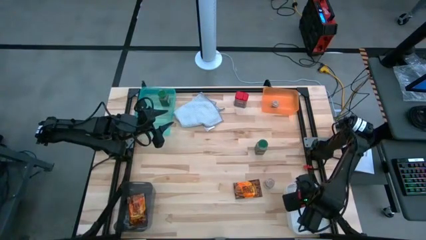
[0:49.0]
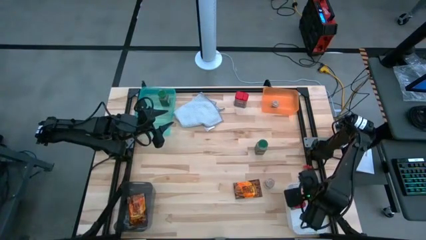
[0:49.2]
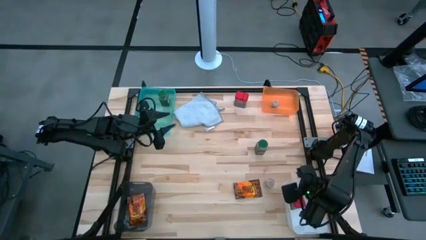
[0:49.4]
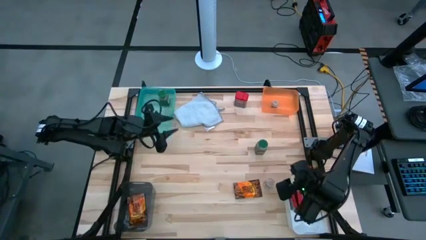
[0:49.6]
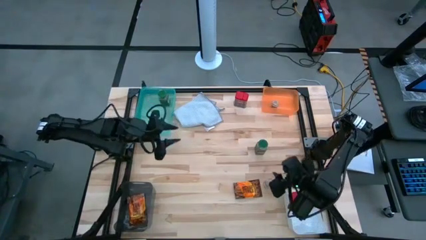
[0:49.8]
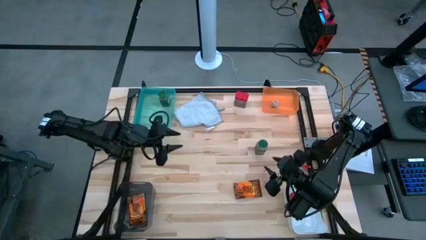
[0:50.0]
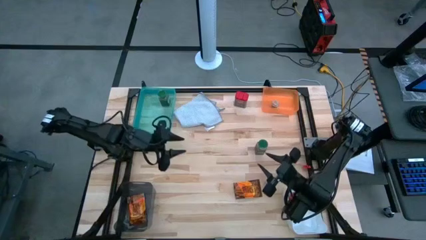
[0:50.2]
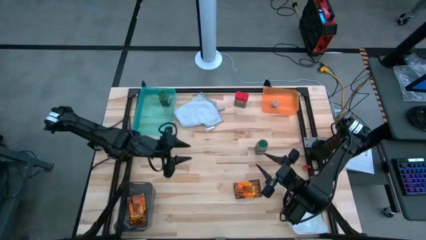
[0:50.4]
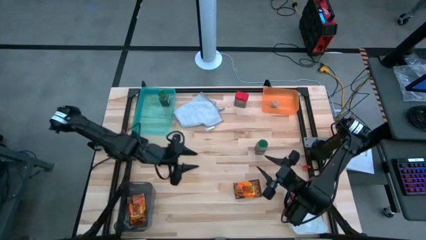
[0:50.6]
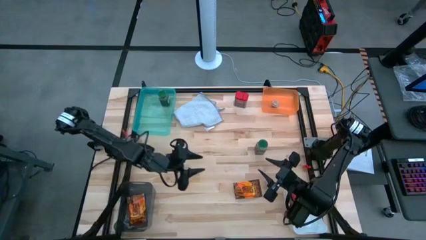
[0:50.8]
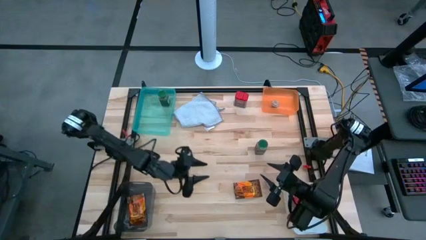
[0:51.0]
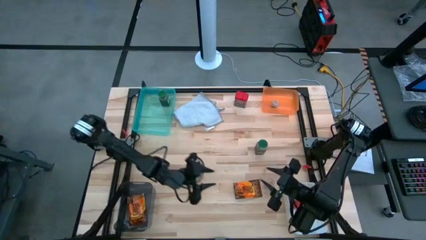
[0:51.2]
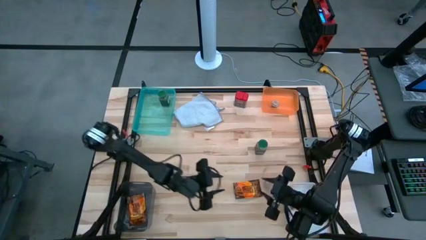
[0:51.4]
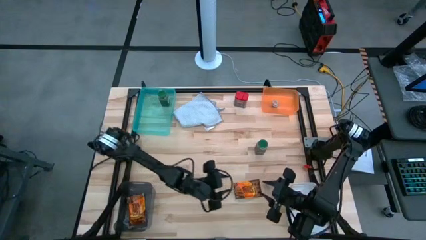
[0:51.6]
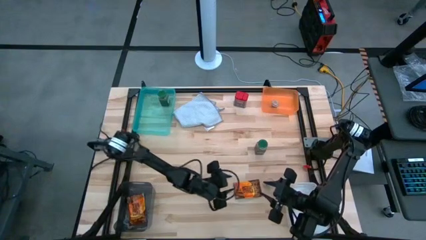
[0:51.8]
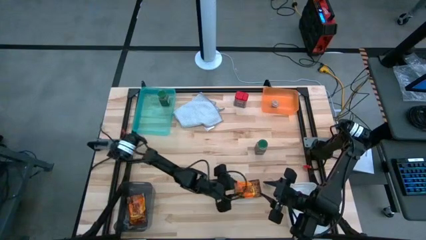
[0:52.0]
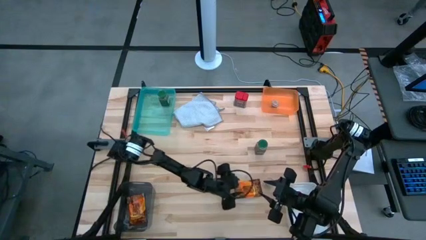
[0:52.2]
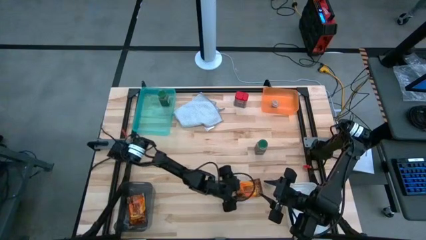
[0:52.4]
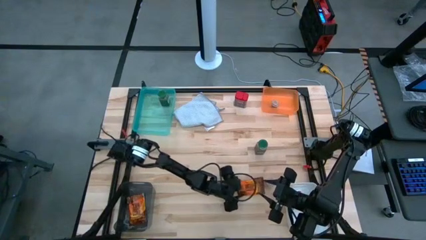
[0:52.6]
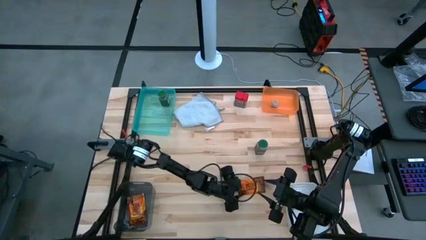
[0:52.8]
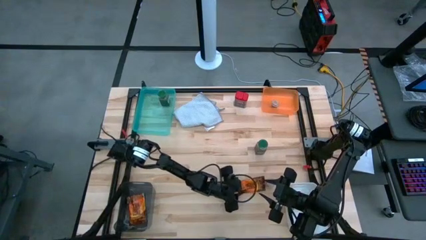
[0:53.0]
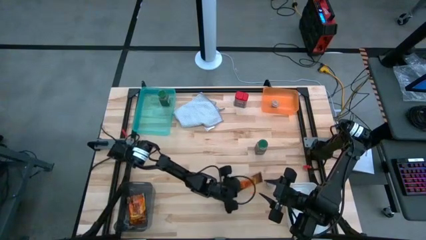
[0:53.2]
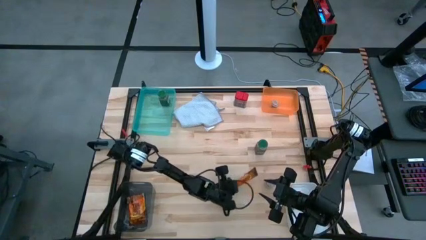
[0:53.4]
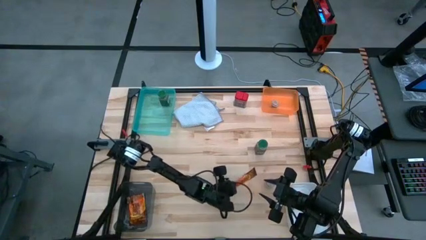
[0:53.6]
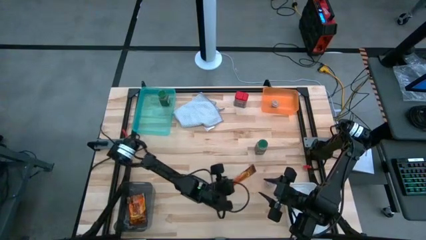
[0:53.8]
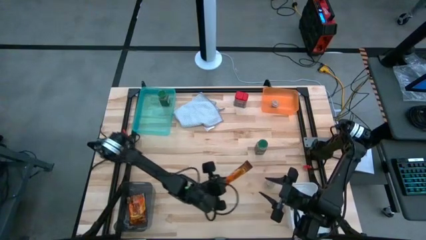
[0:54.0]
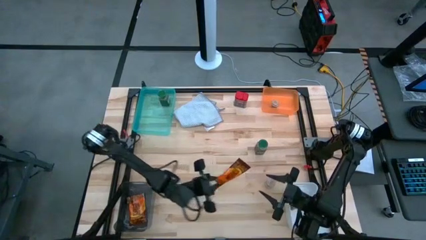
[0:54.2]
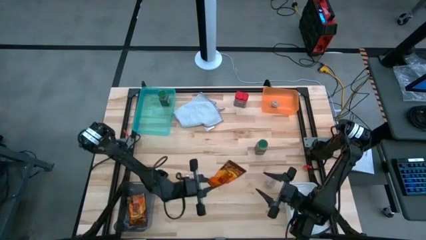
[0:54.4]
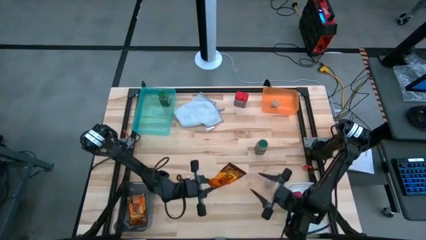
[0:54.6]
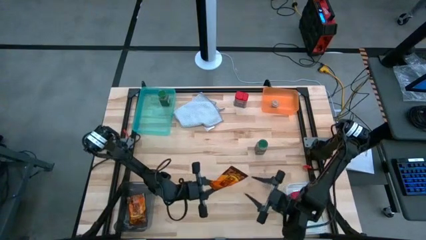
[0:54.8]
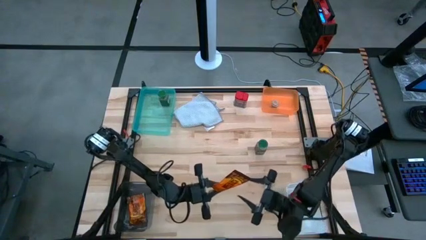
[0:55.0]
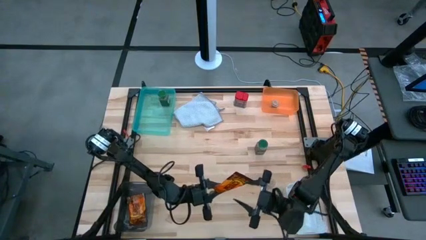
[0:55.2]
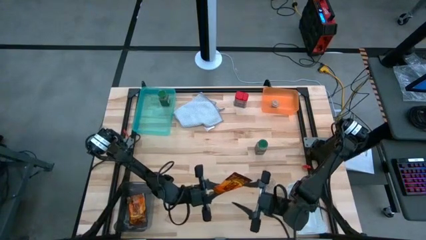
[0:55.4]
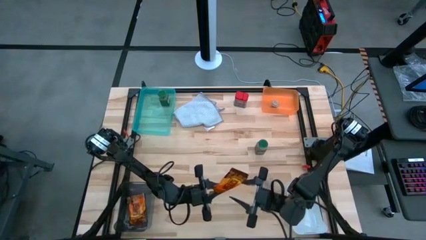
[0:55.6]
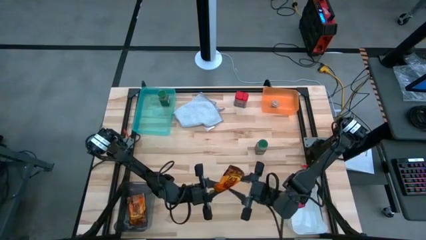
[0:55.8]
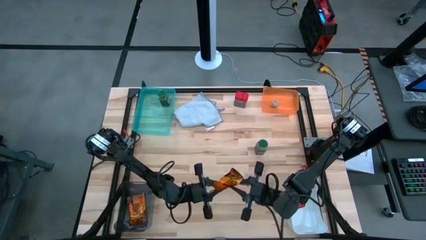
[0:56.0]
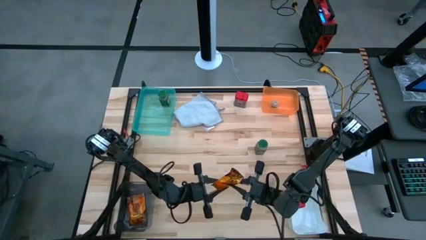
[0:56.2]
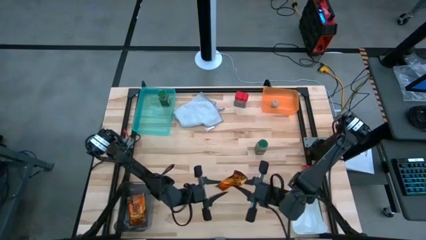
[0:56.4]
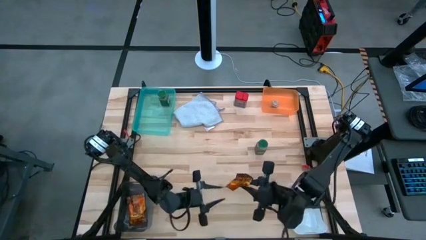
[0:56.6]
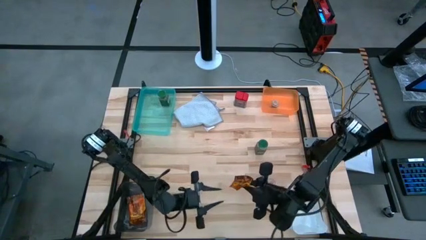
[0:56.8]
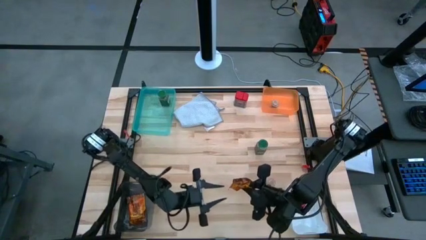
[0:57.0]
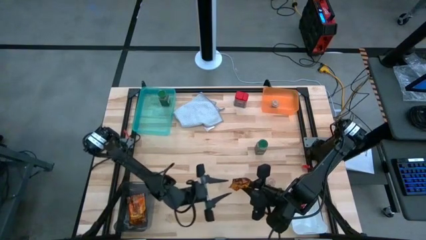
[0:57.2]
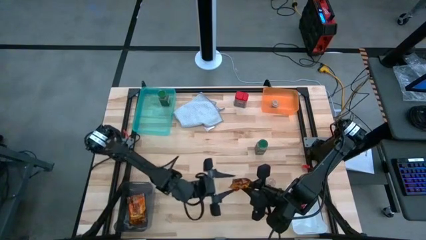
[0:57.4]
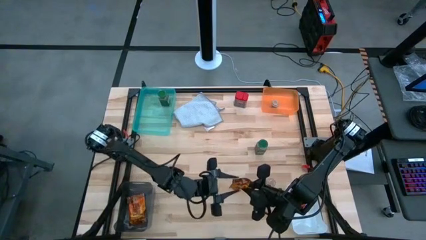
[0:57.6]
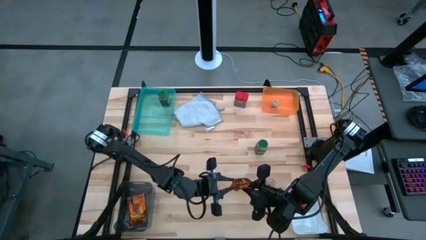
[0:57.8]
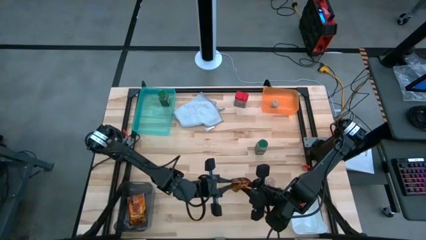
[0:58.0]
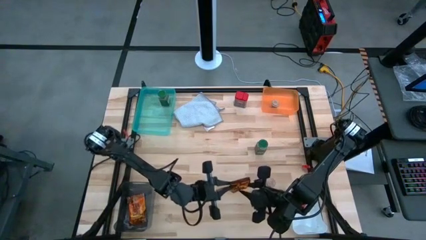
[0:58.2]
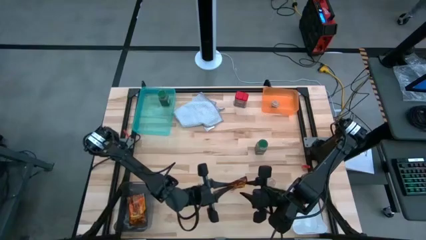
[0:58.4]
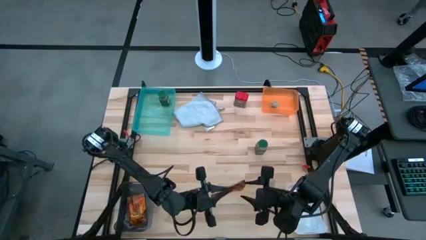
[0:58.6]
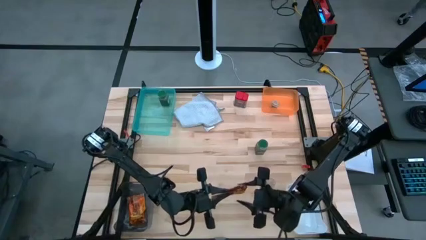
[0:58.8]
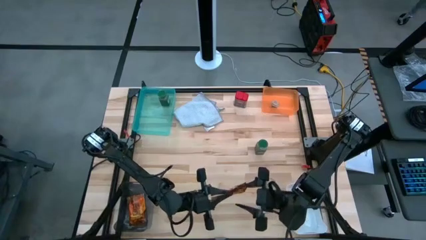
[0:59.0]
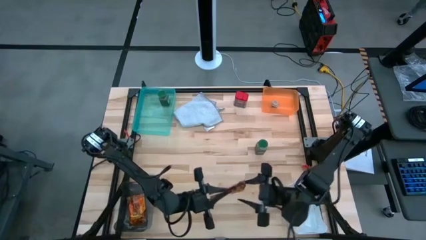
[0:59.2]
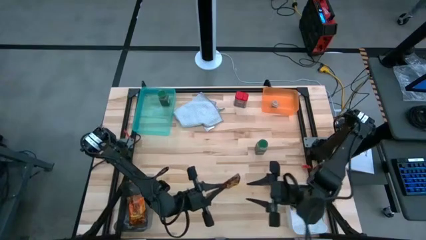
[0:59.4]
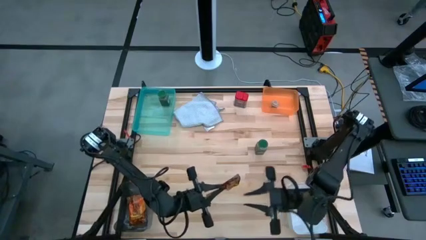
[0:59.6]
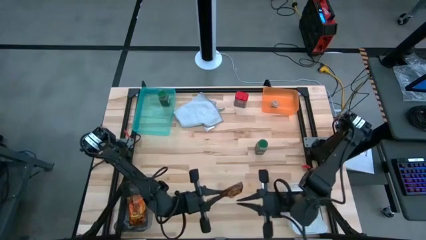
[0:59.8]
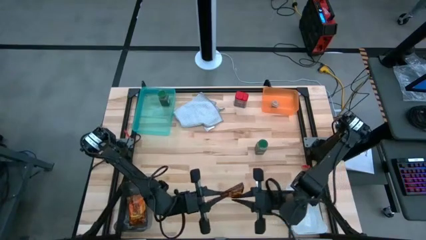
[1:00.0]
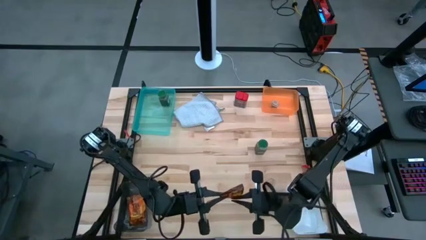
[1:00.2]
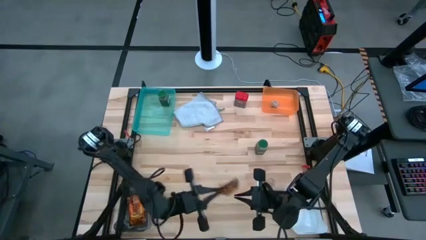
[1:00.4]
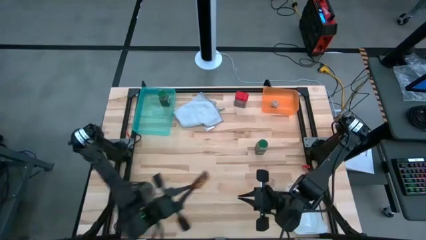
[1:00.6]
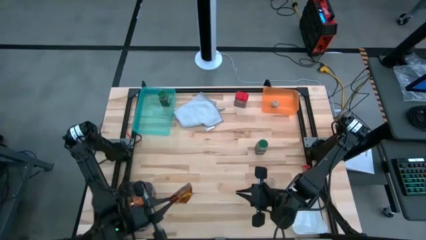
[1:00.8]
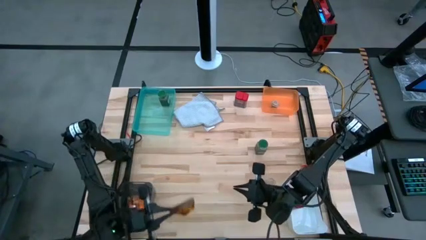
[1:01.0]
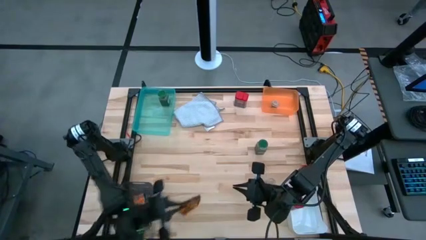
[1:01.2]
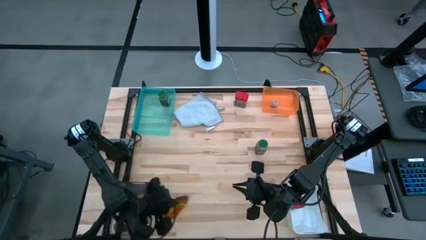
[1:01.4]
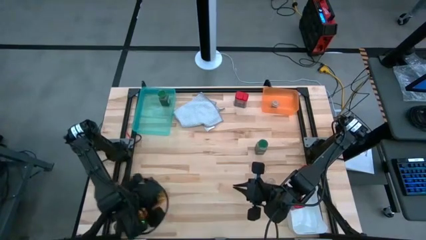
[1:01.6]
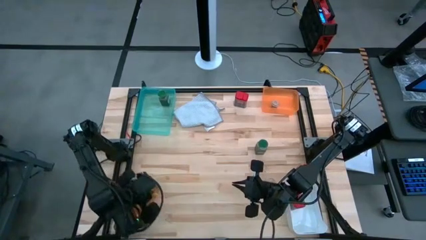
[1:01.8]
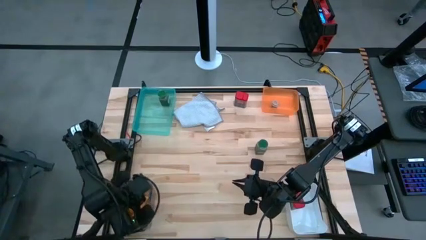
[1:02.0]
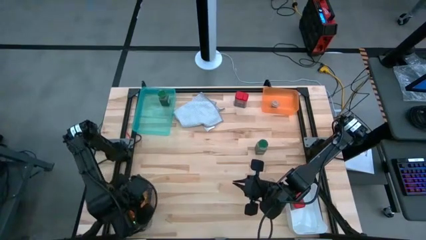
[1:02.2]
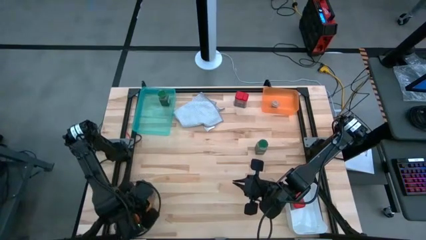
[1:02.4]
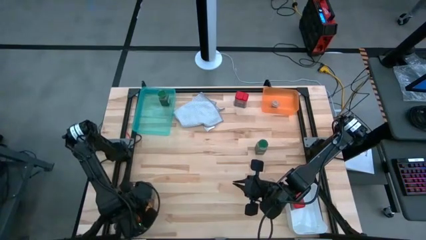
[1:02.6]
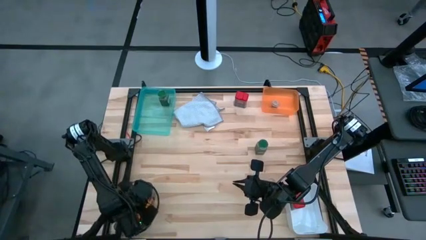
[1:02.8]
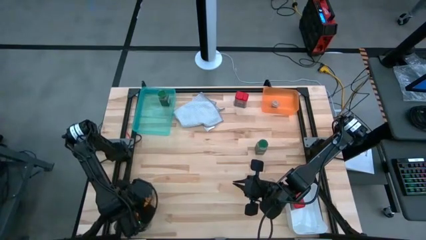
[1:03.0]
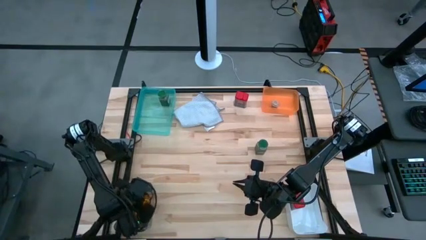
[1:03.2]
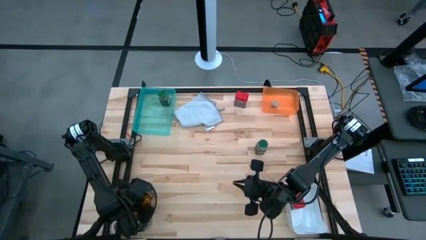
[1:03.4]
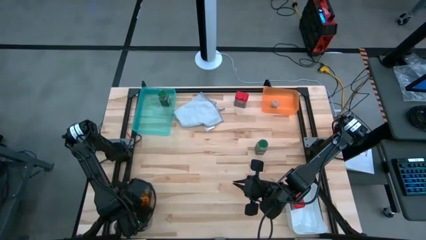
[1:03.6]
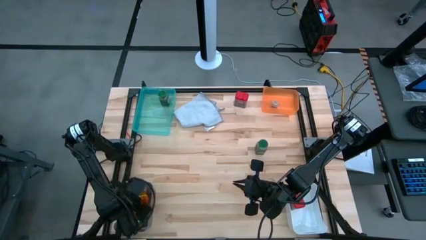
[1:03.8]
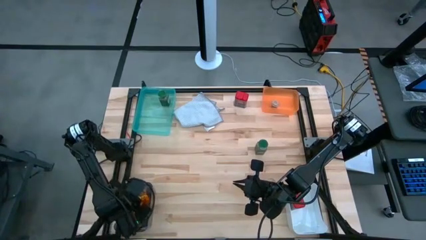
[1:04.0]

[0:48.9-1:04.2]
Task: Sort spices by type
Put the orange seasoning pack into the black bin
